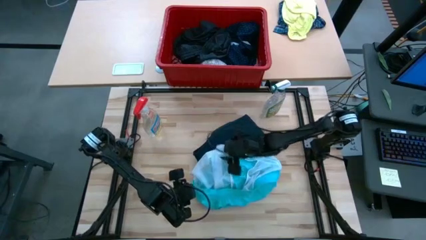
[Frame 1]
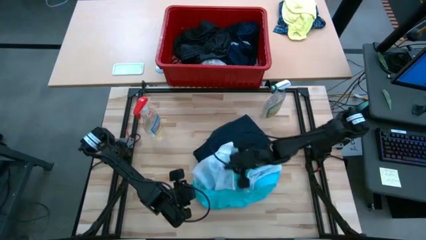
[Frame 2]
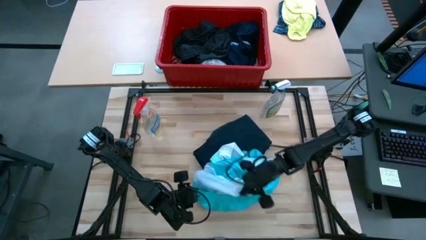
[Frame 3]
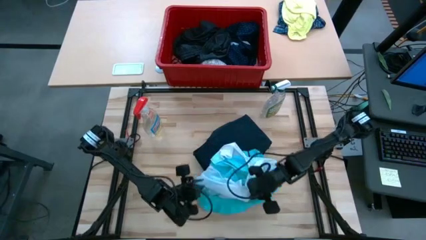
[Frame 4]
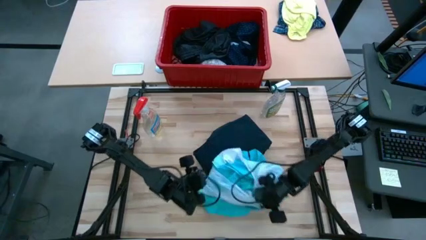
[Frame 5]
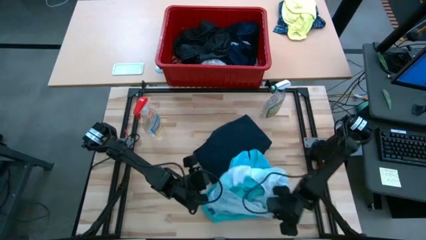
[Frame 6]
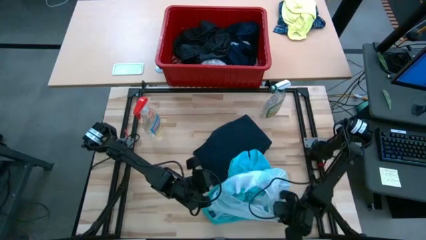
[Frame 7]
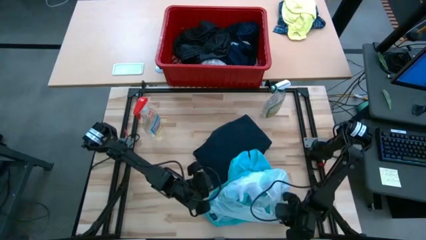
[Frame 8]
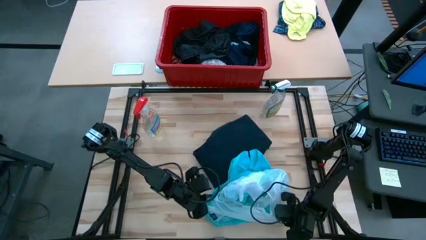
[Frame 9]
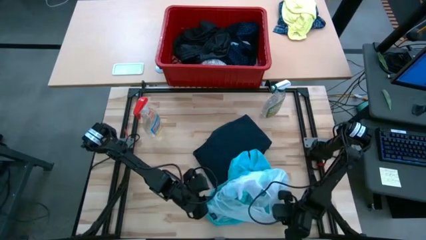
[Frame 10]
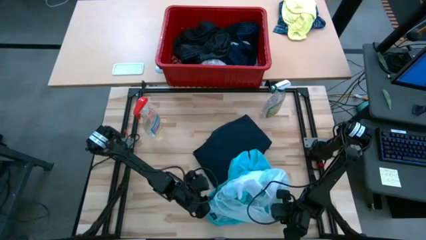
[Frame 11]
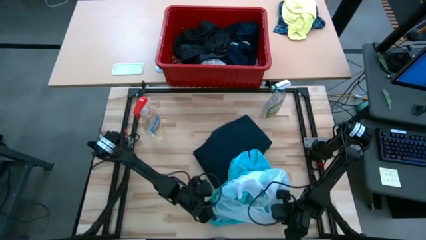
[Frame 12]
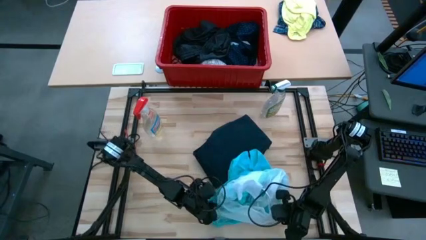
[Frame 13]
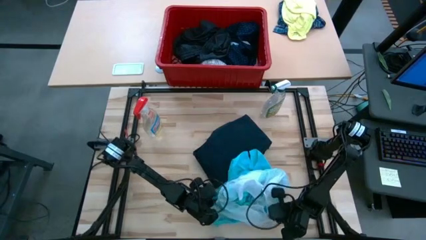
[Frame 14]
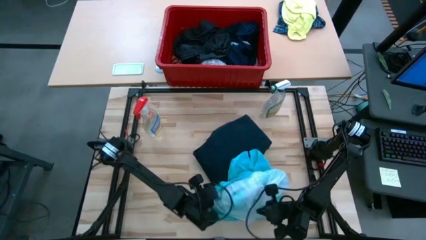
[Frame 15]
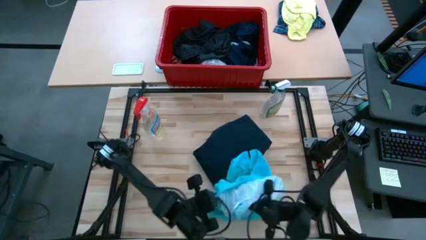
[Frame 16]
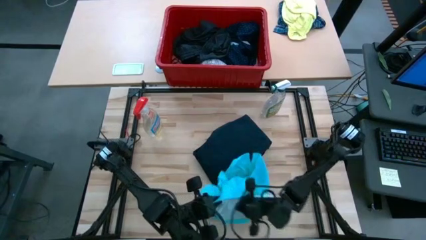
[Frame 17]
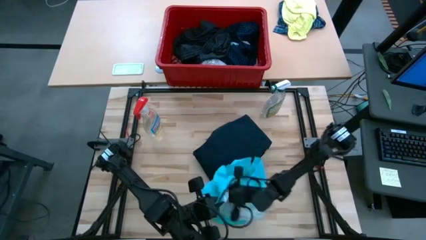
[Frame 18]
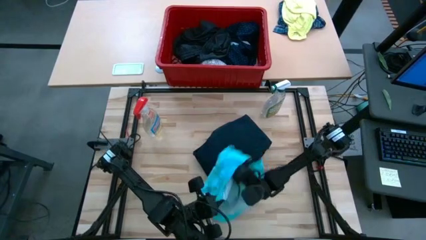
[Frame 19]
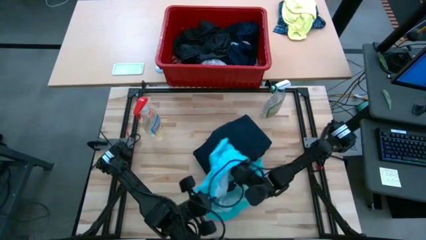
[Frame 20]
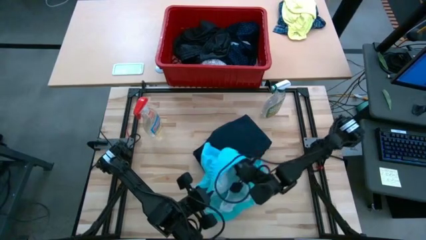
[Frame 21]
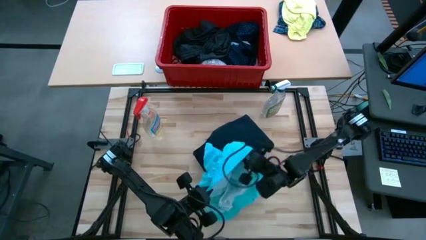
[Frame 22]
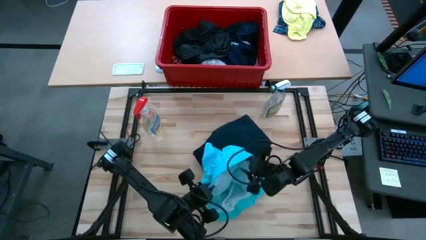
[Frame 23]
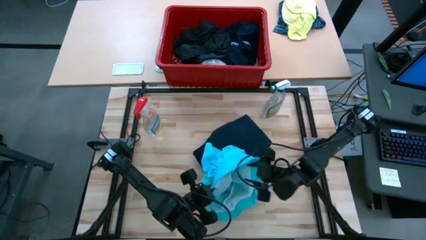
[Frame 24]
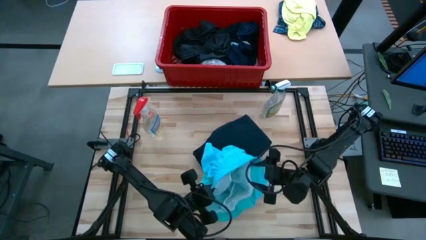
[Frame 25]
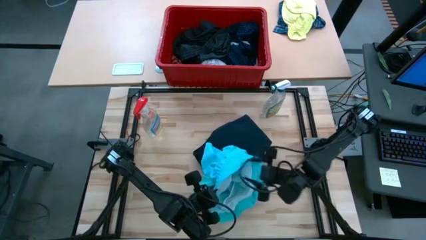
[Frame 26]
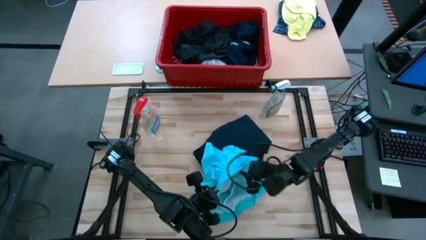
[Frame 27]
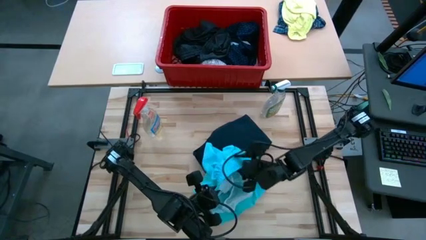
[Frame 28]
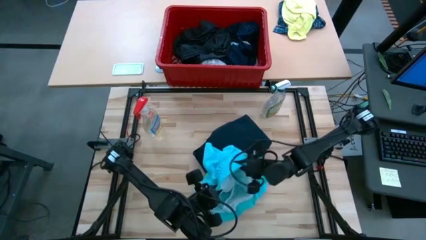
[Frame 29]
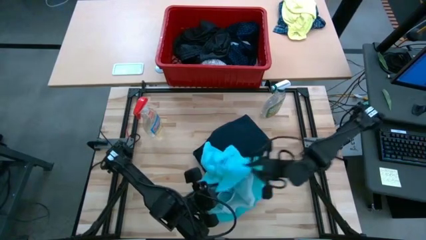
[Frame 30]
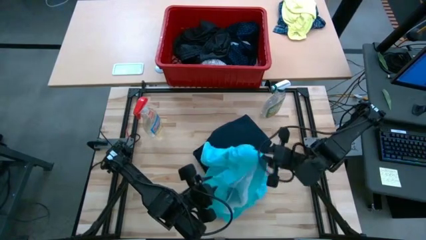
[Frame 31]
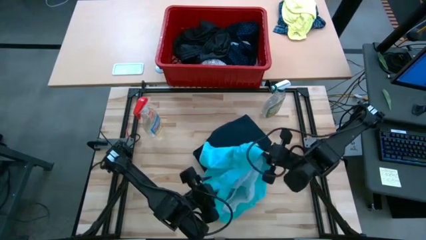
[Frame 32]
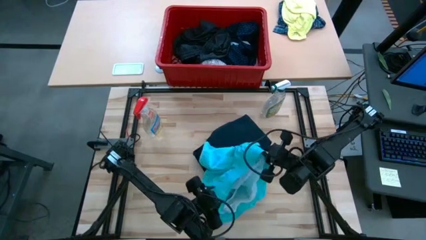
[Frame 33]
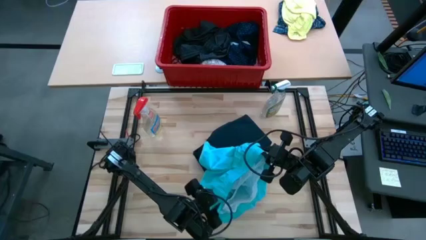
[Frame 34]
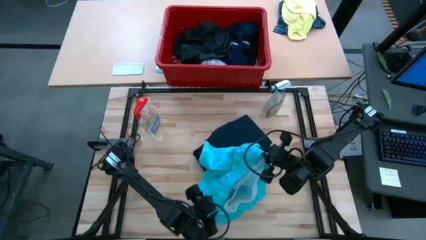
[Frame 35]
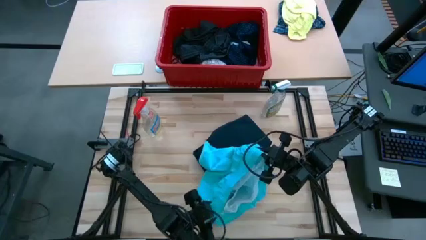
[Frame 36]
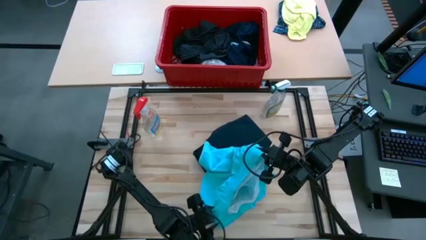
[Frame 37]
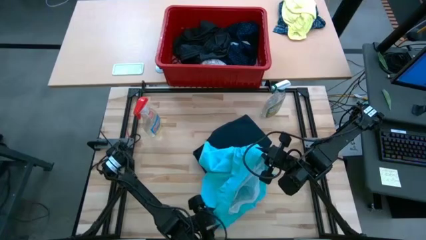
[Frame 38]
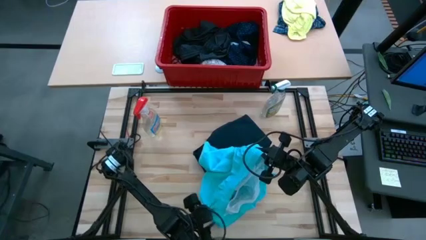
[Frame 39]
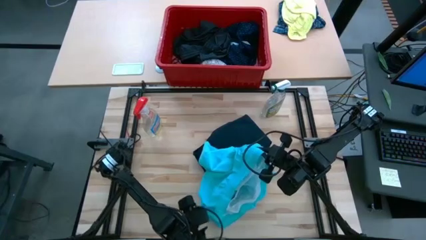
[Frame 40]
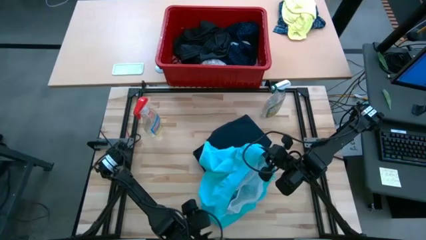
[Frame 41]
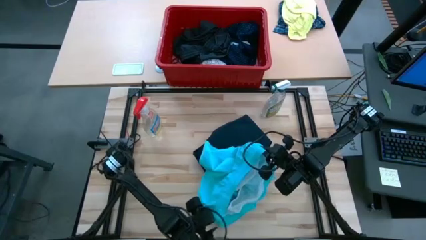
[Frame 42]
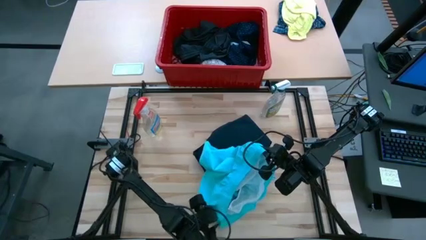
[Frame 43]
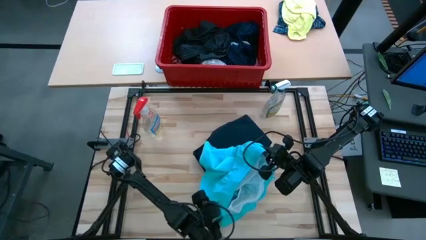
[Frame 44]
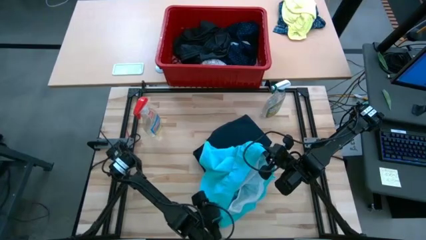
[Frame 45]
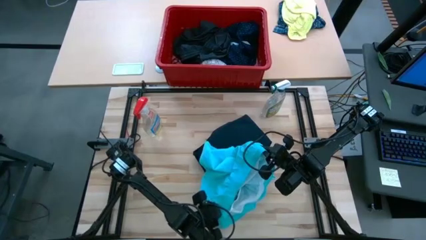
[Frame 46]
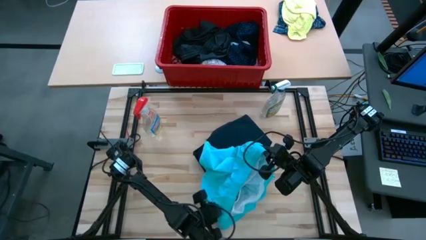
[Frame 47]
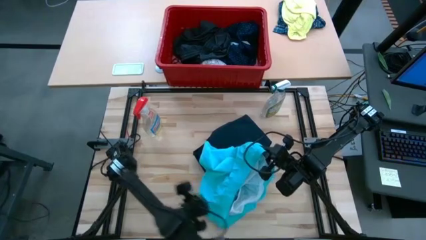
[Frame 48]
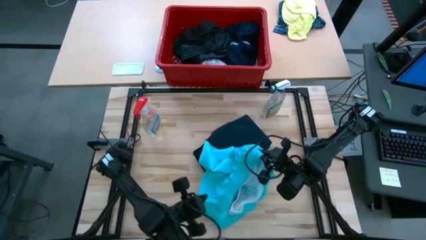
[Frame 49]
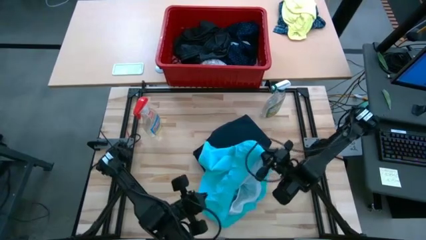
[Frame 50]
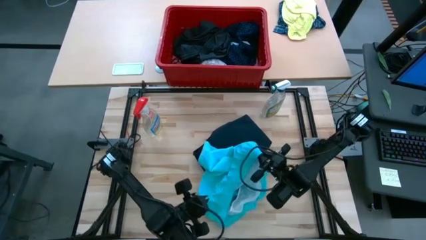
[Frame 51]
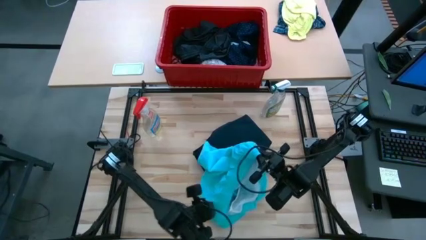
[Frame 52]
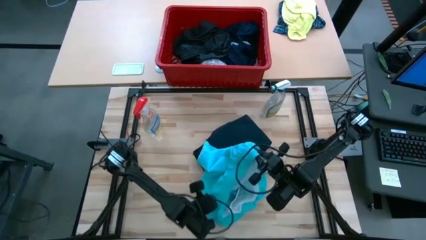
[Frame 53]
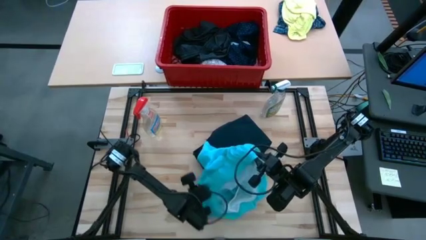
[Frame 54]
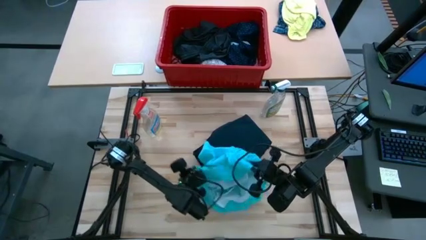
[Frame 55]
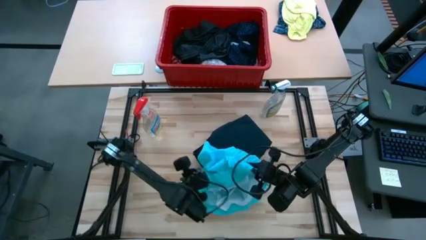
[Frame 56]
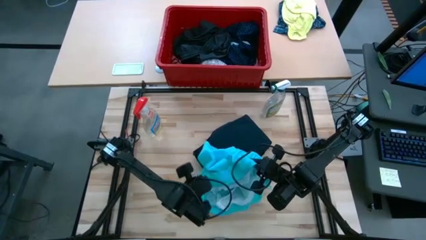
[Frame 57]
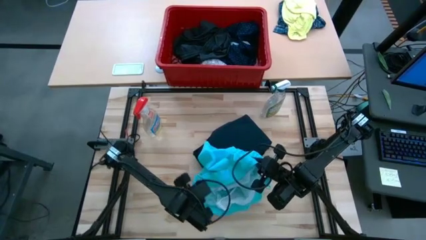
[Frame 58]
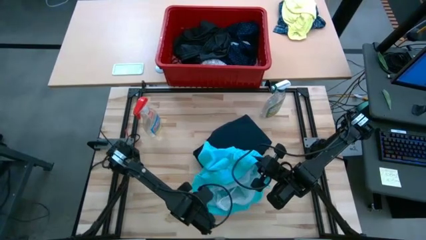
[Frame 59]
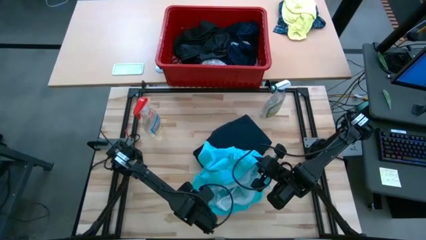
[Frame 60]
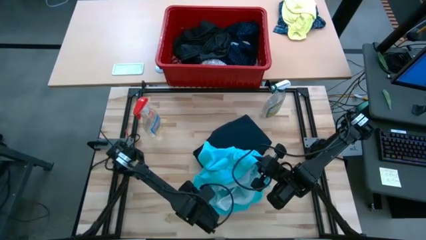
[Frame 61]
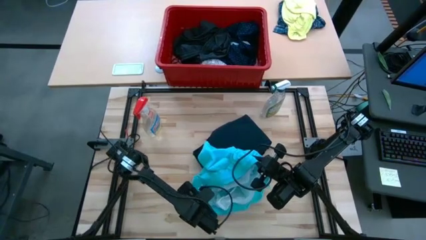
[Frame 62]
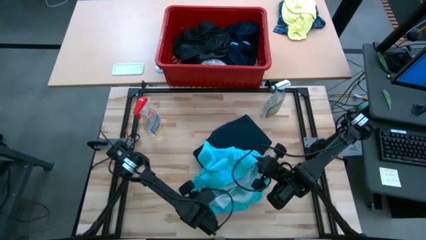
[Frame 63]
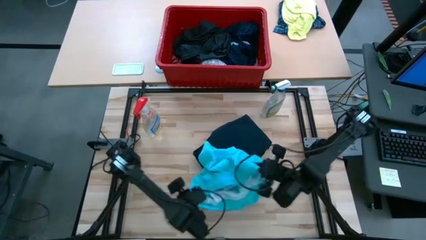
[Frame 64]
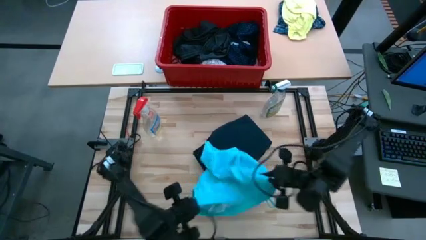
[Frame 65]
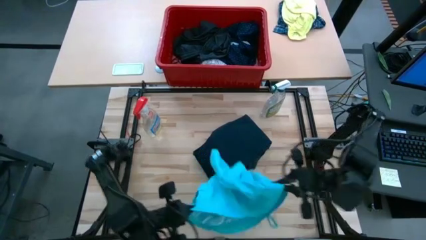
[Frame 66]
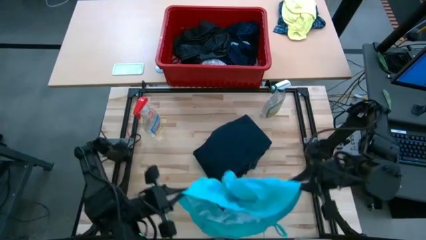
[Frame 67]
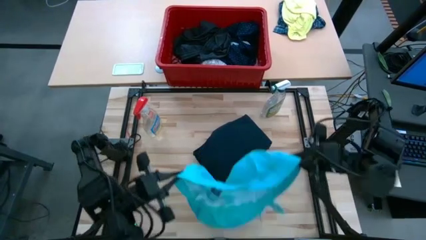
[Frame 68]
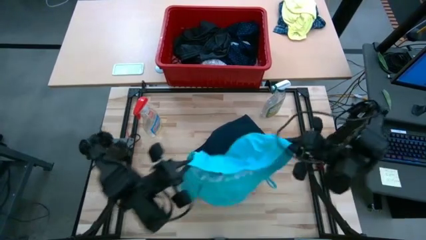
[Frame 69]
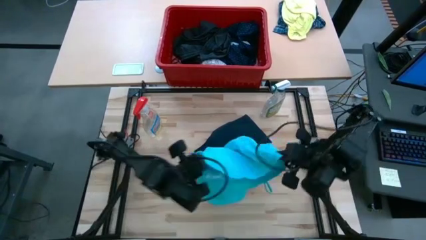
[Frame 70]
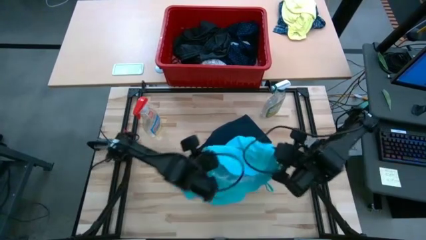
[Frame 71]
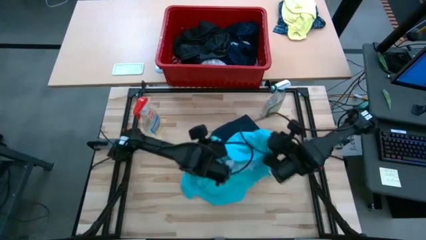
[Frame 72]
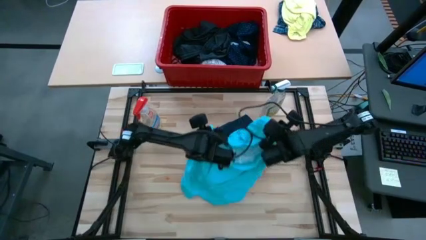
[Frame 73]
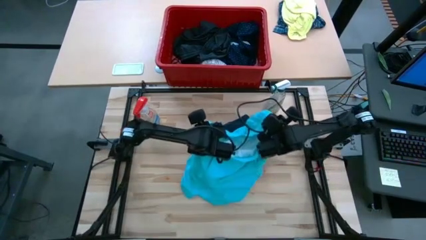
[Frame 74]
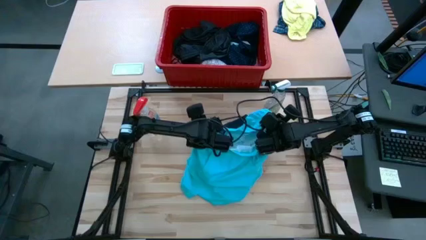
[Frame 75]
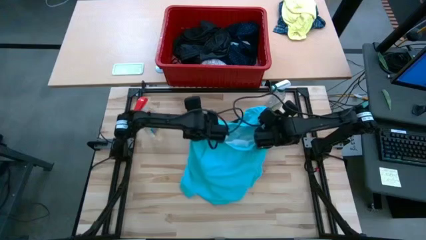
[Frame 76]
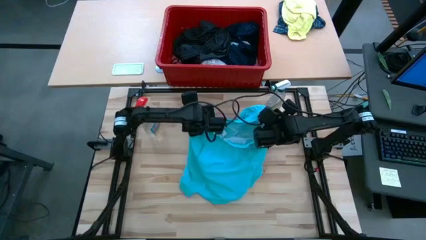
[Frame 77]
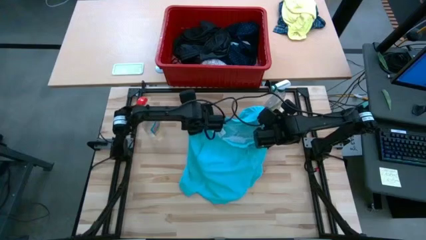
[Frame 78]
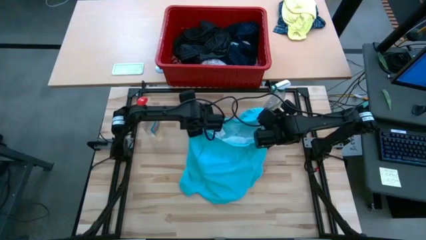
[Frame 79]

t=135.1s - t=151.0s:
Task: Fold Laundry from Bin
Fold the light blue shorts
